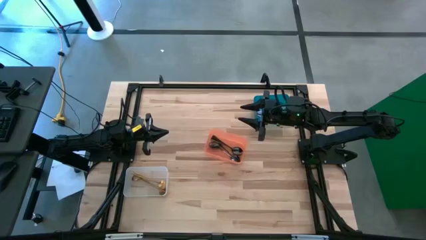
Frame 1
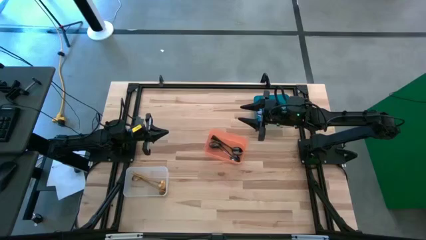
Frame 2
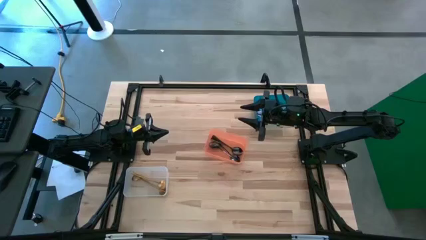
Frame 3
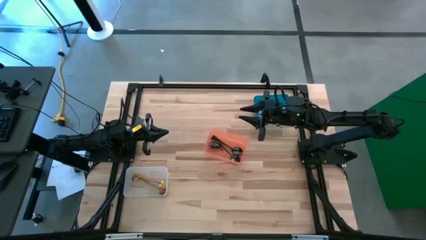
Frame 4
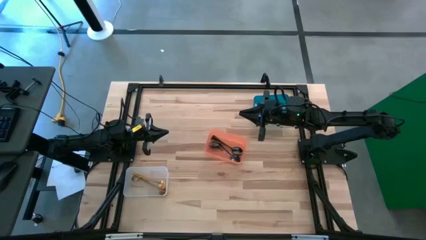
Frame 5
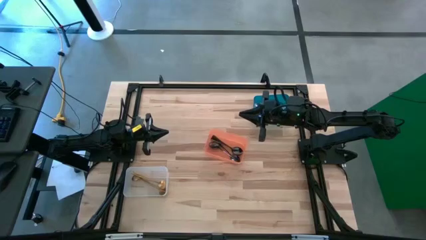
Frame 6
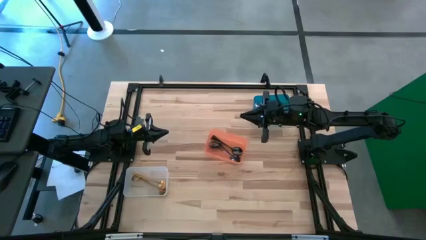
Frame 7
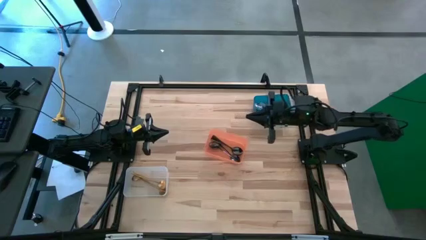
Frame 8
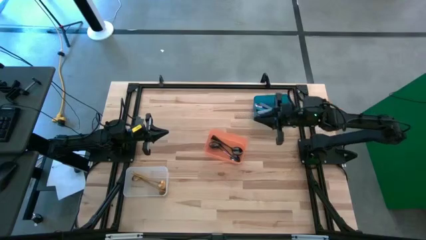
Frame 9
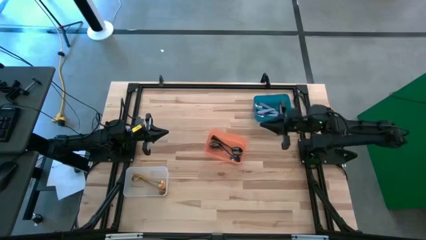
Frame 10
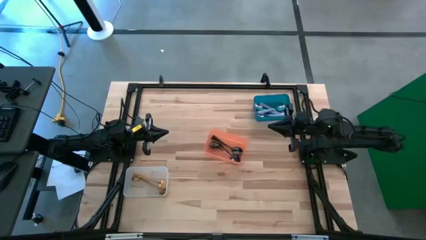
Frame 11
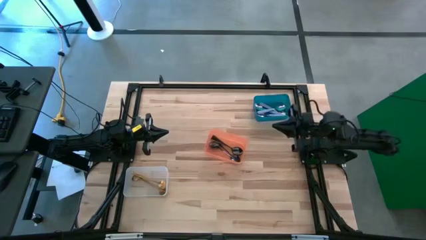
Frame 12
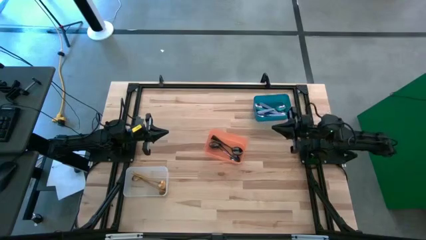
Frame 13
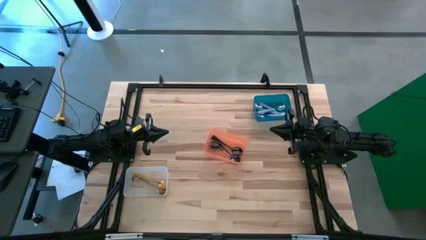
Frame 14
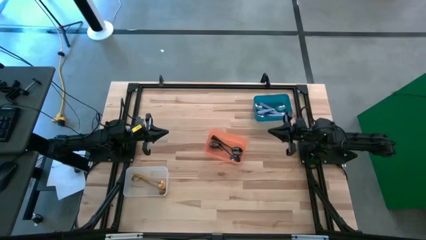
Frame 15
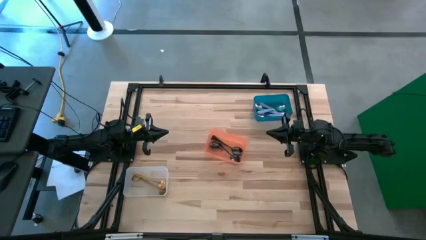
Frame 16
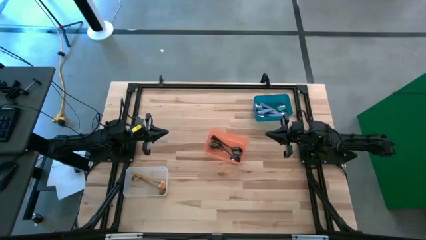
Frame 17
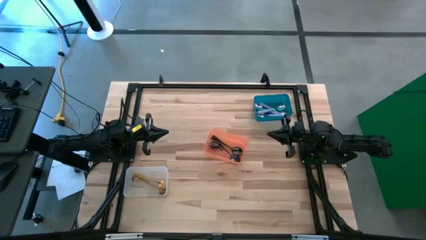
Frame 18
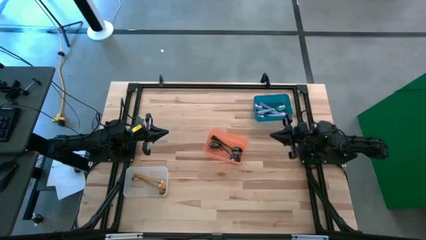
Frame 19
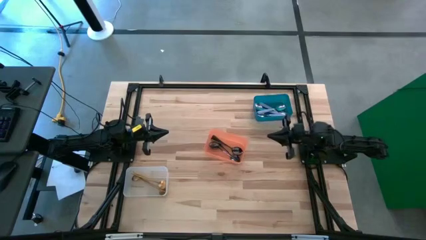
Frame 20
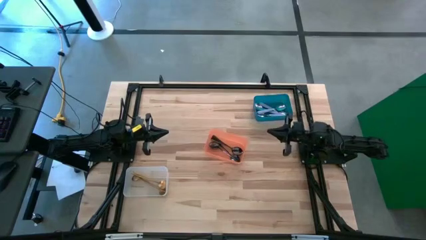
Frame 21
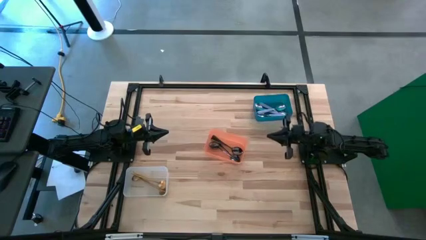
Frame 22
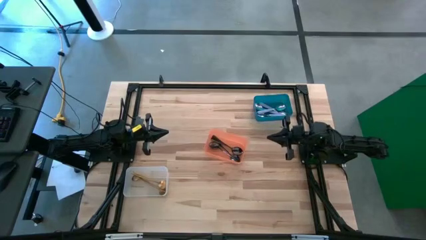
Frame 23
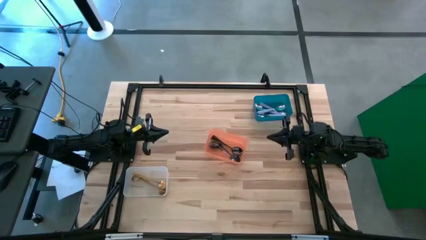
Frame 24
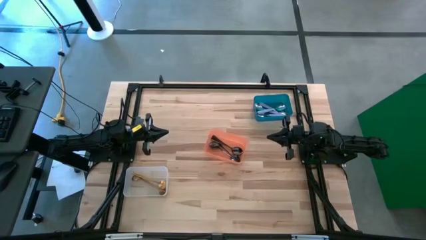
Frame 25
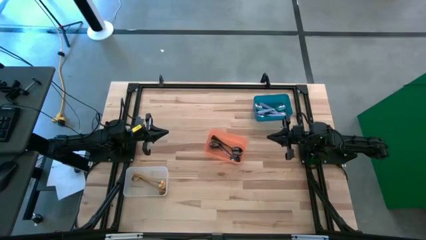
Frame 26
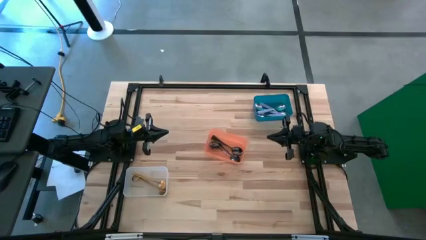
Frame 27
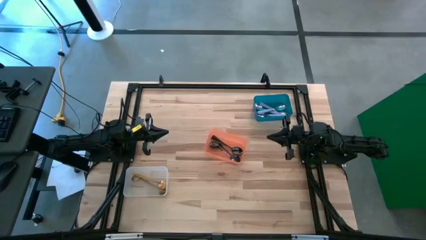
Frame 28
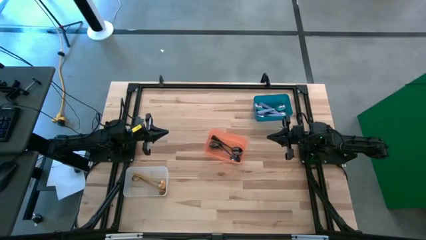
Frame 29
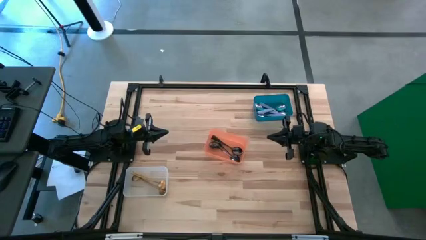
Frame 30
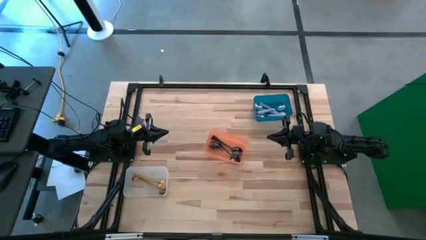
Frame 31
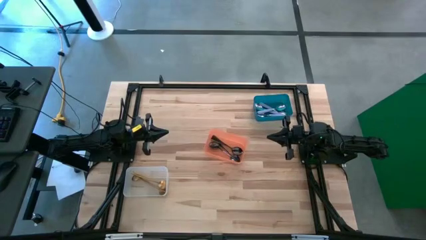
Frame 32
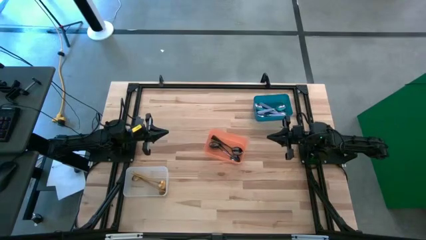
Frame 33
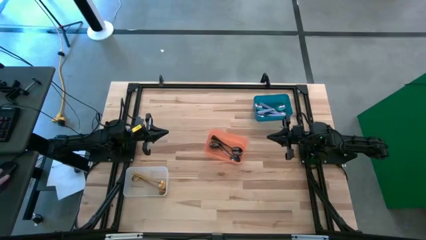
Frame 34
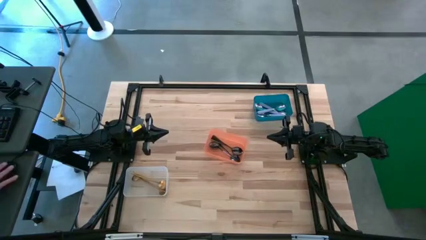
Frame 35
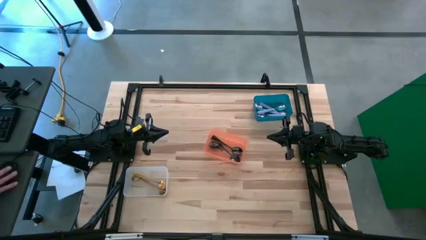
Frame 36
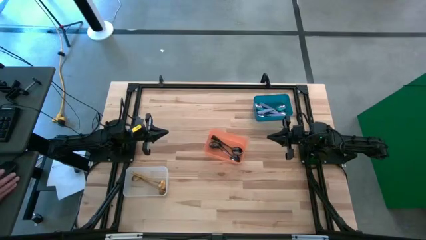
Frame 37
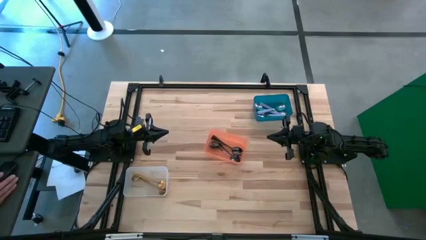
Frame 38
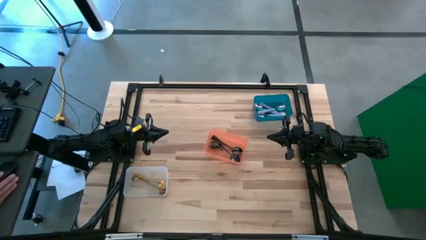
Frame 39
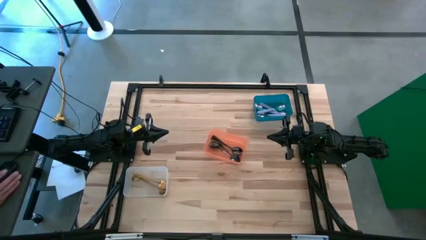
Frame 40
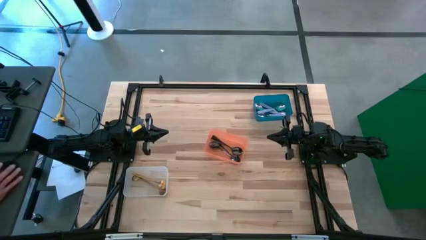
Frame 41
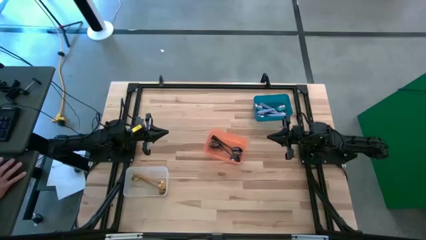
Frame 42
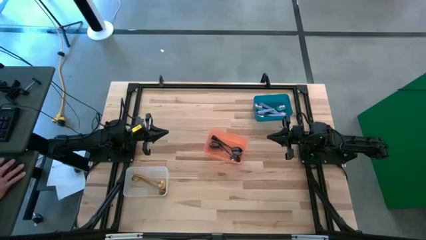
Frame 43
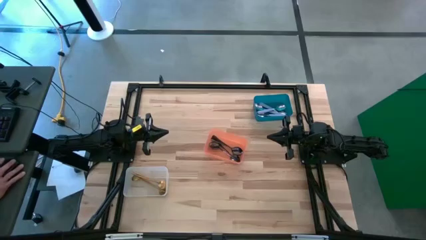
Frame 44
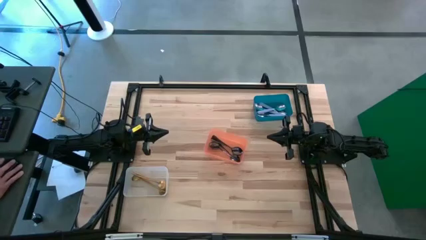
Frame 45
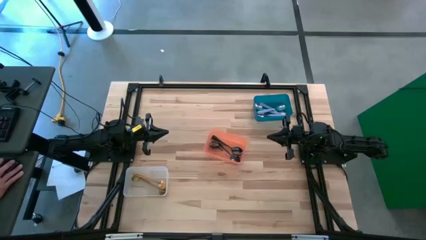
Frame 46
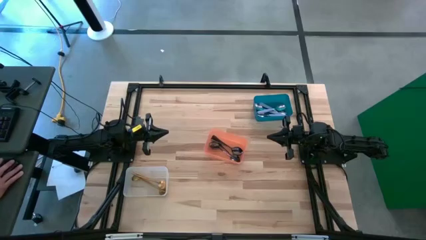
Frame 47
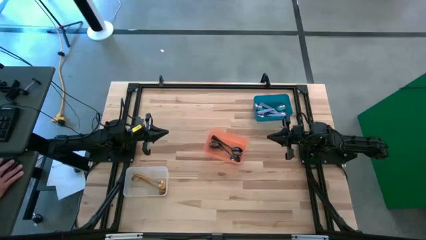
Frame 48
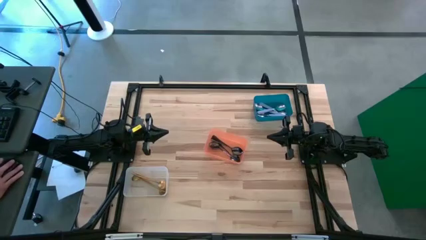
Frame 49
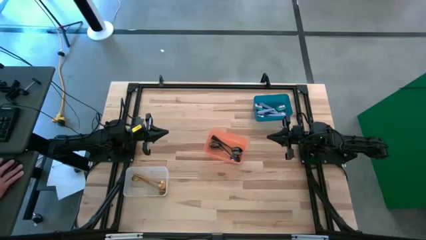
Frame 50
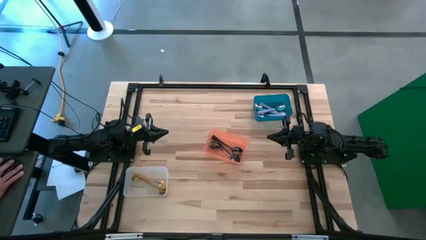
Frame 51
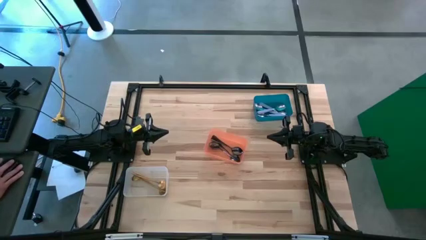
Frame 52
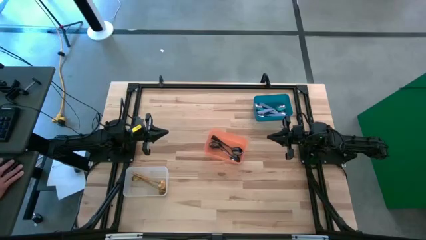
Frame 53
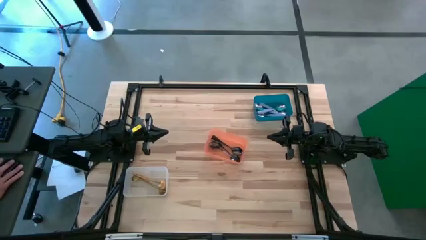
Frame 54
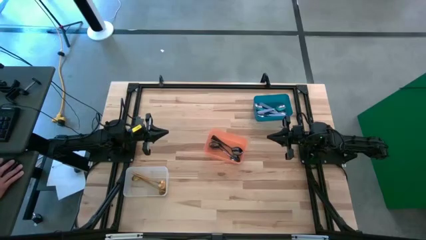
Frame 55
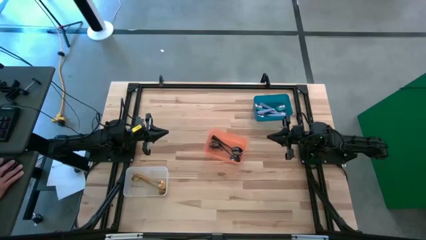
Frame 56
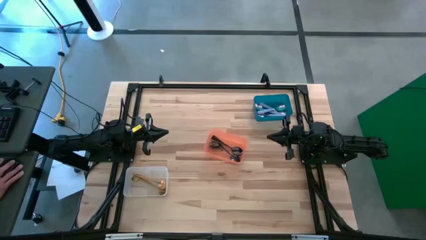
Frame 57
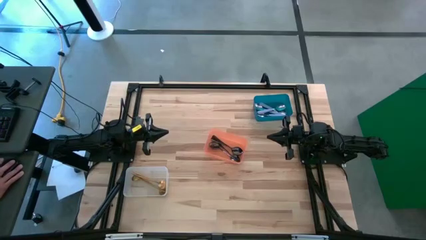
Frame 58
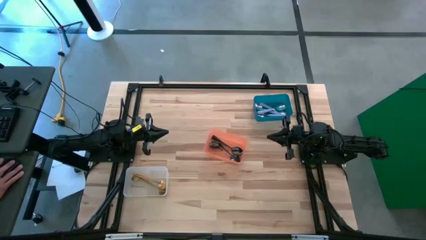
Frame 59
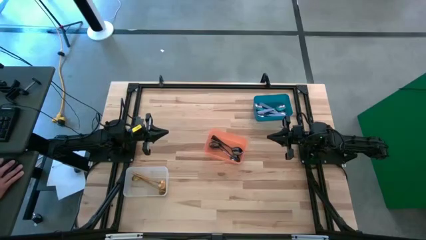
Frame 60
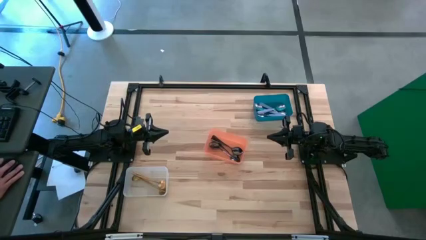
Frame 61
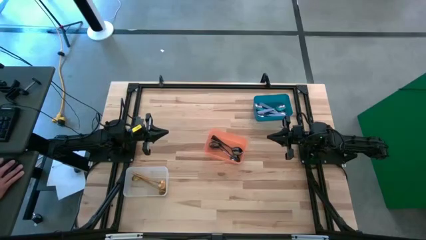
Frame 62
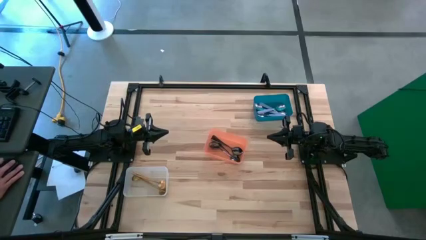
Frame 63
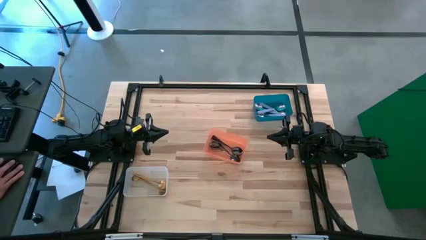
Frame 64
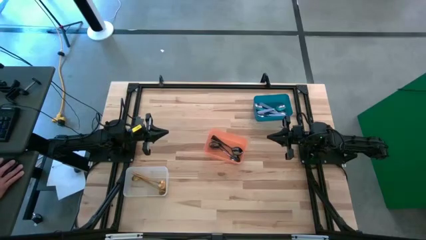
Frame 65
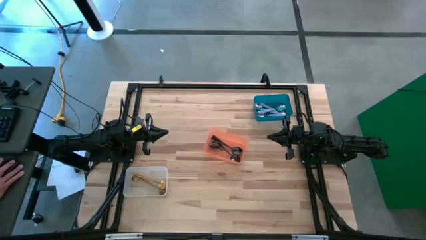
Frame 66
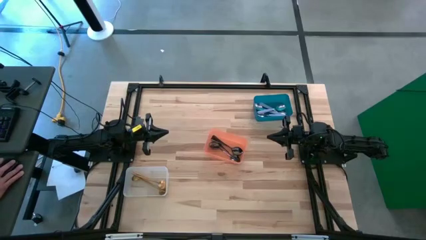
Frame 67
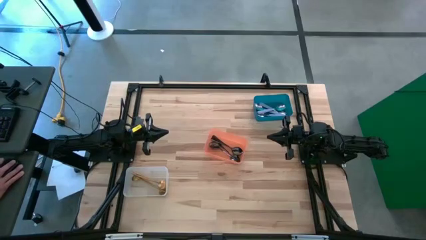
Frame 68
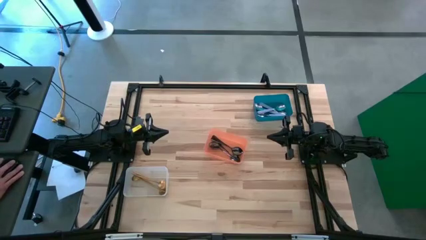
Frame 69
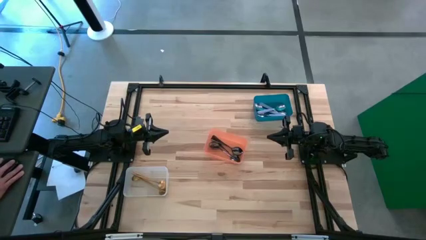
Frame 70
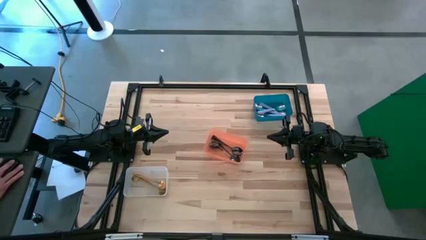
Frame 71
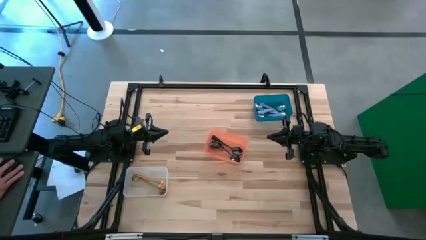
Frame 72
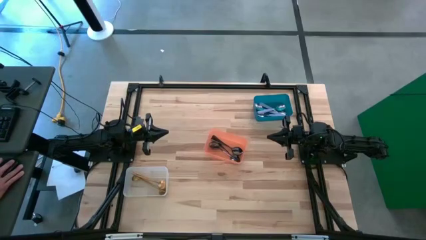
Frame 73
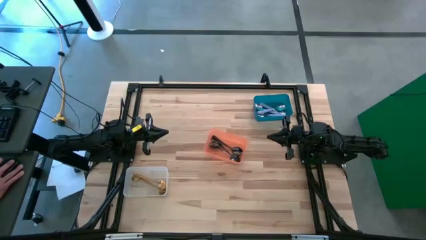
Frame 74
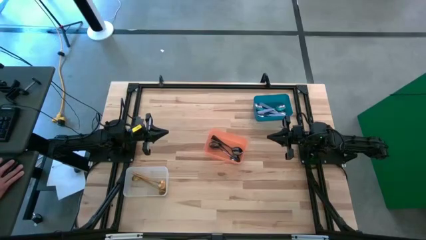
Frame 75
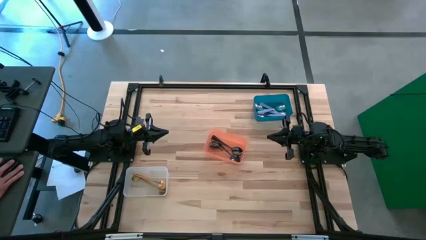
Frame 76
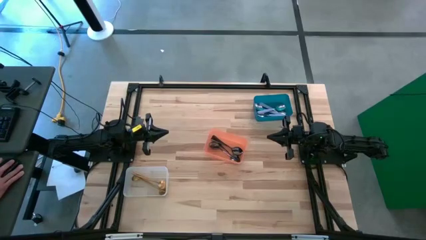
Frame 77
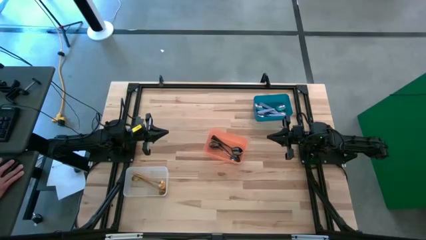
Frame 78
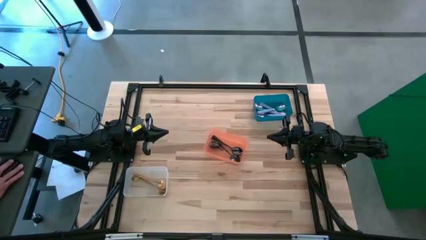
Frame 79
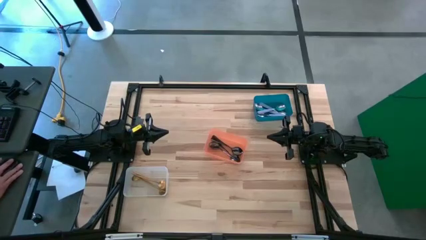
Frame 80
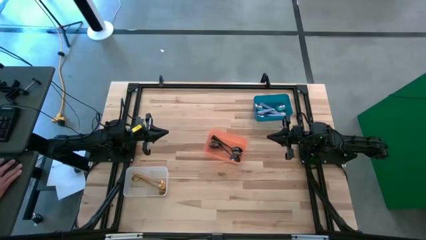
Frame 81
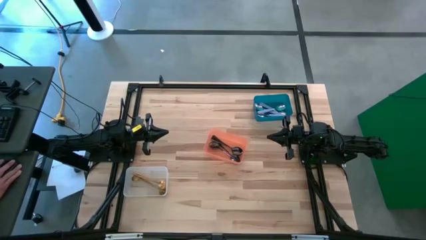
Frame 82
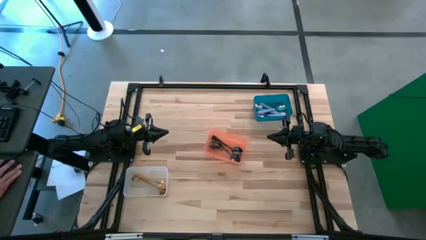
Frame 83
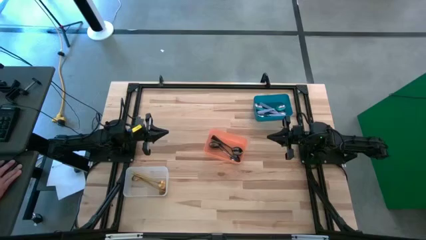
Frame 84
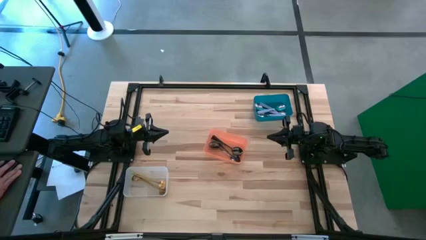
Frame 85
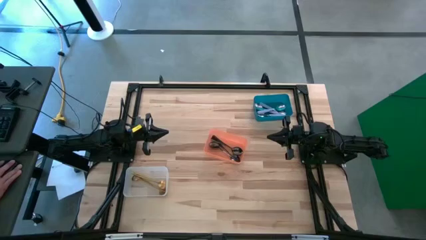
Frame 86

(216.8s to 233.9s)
Task: Sort silverware by color (type)
Return to Home Position
